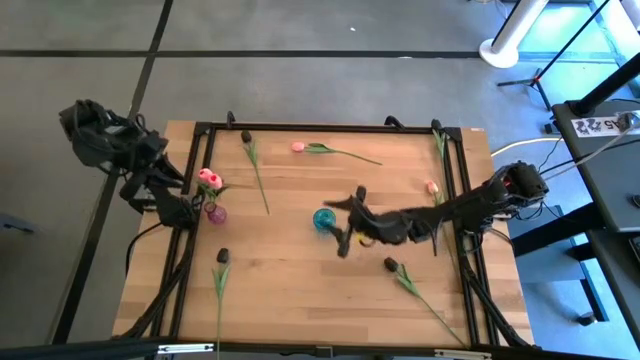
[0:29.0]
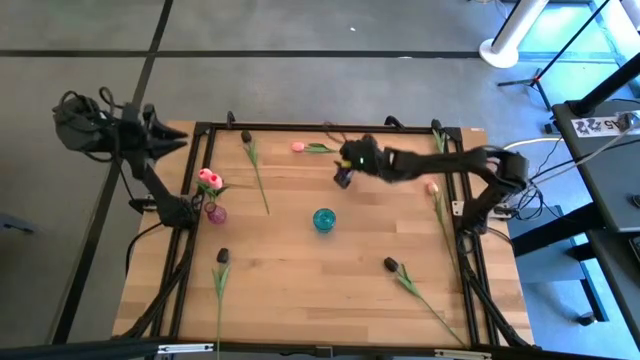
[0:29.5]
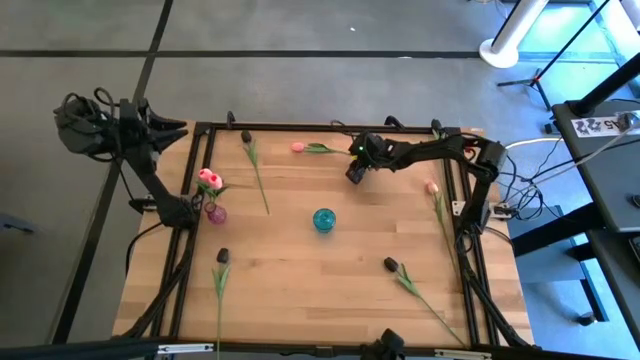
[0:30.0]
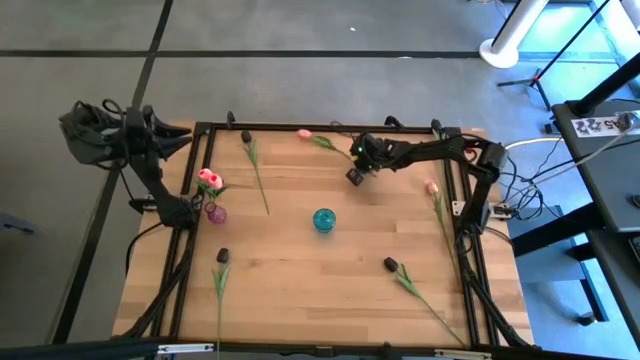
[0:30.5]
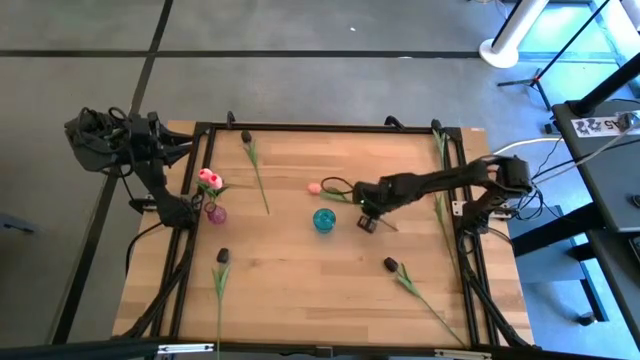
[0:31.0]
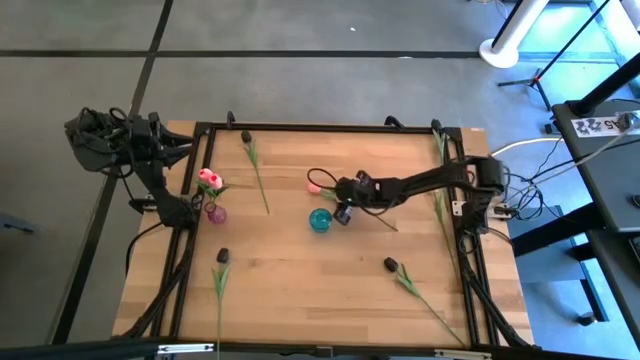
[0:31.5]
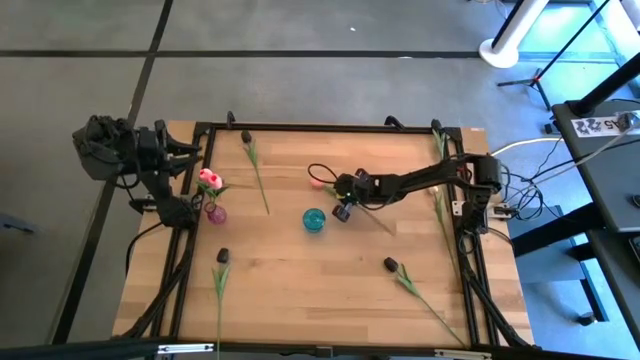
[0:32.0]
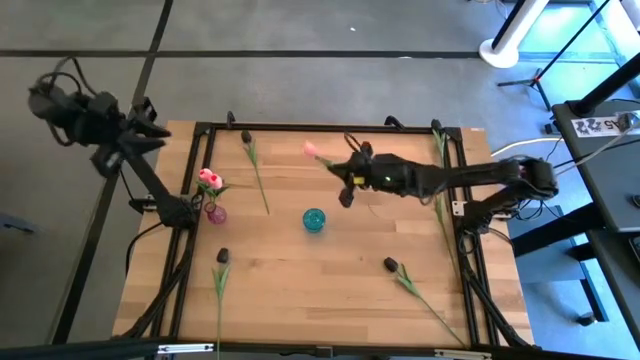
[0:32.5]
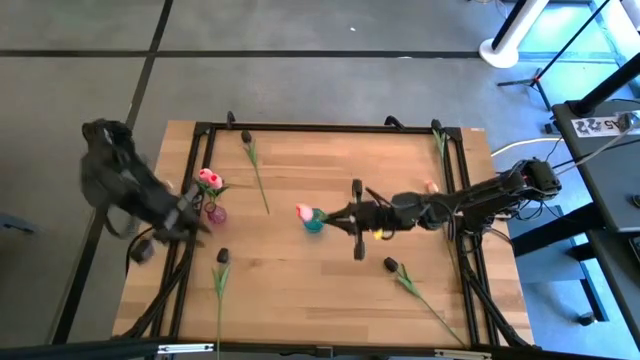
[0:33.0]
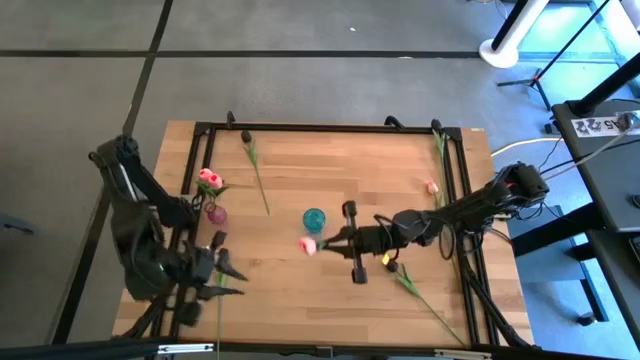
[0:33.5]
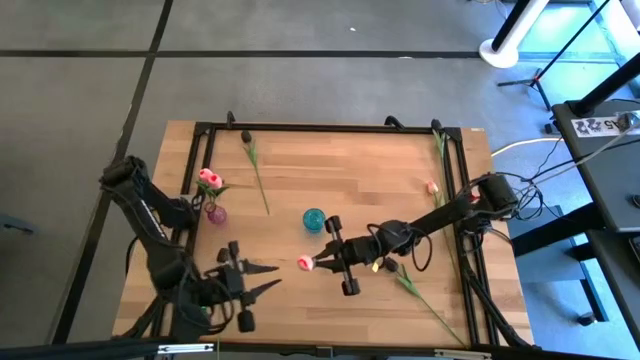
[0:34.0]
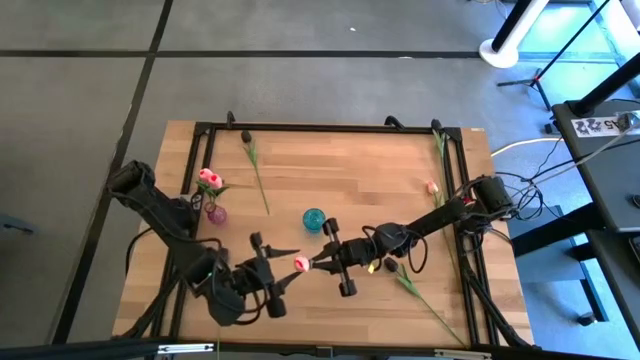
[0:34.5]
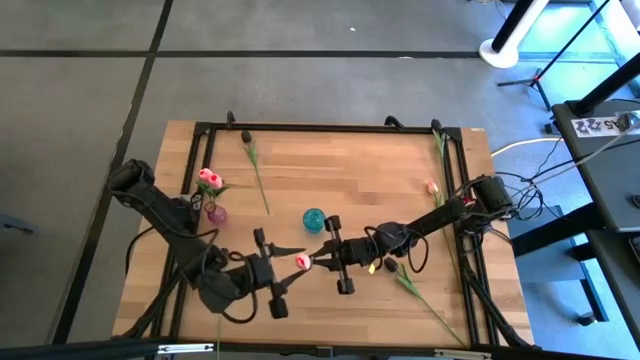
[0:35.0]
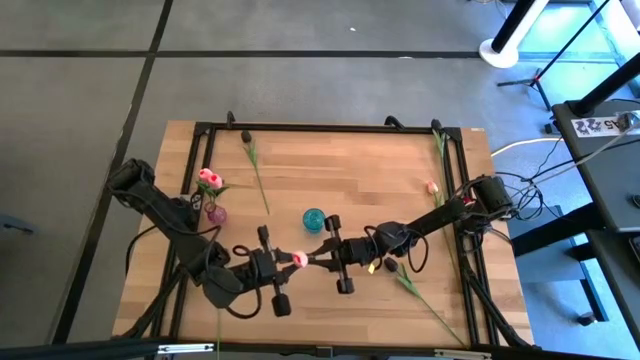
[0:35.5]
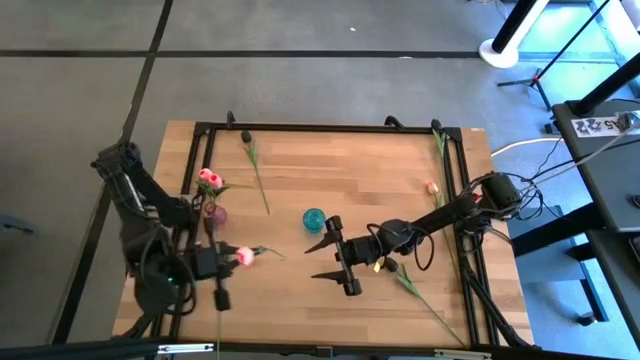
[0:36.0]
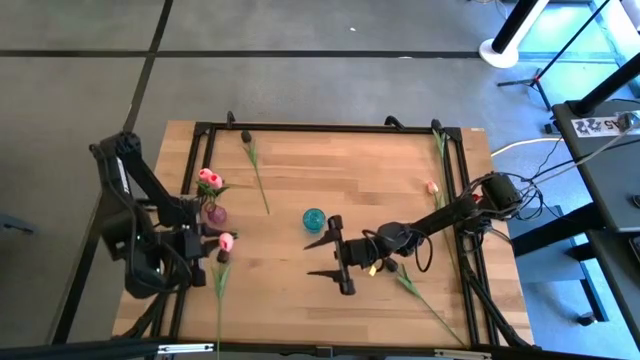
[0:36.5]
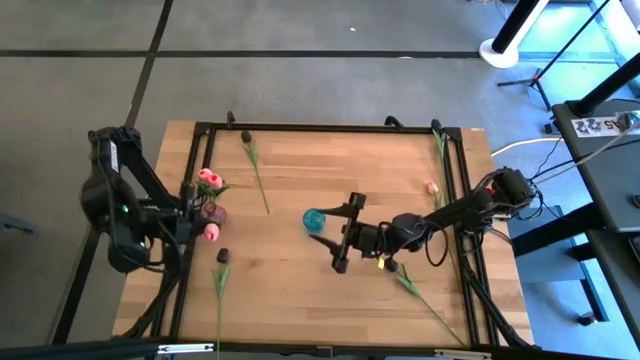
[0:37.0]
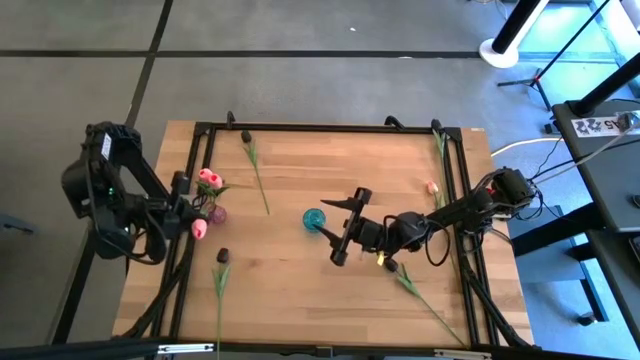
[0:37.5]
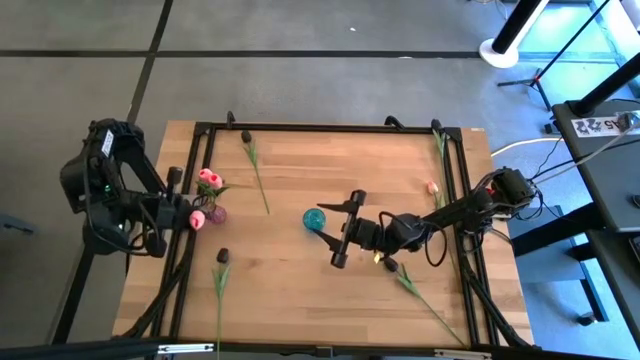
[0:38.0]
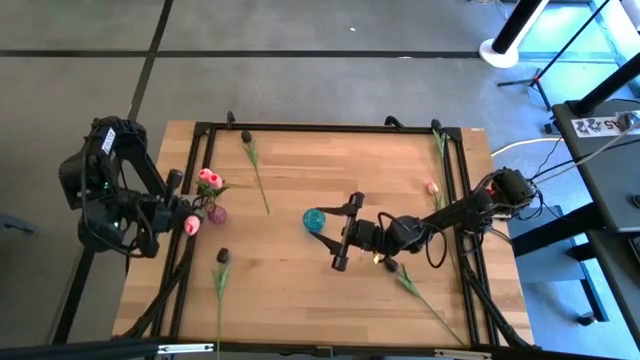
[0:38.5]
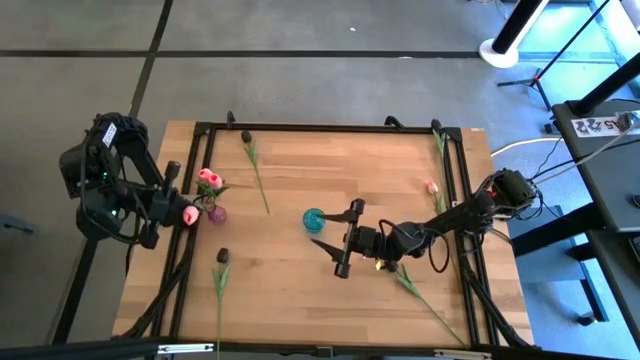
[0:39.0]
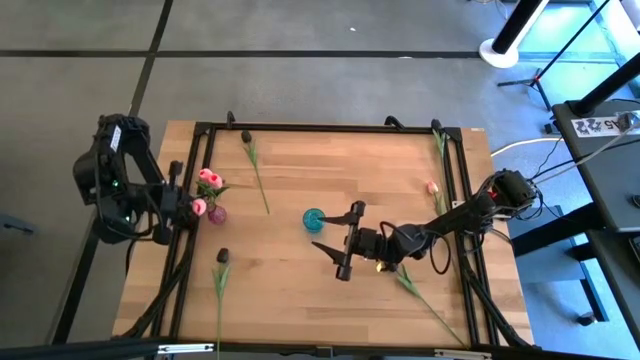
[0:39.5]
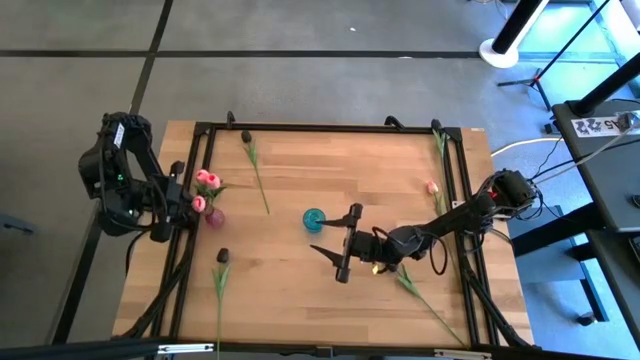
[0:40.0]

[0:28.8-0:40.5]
Task: Sort flowers into vase by color
Put the top pink tulip into the purple vase

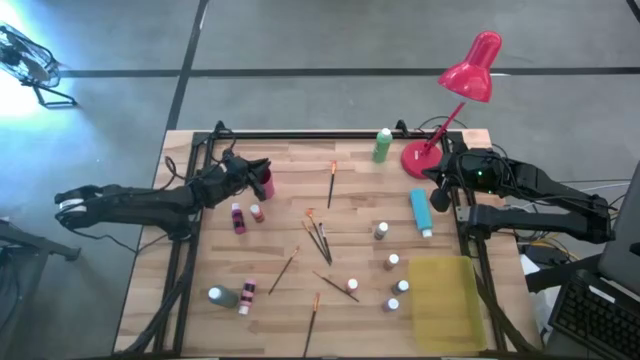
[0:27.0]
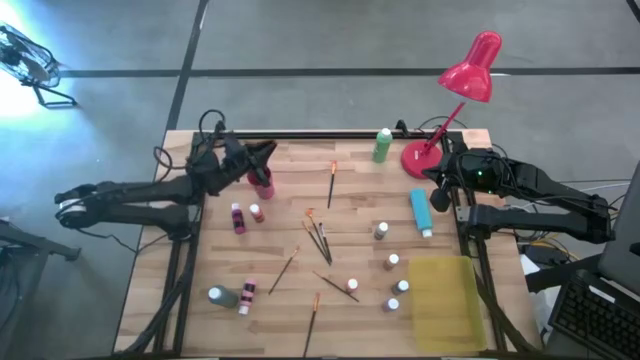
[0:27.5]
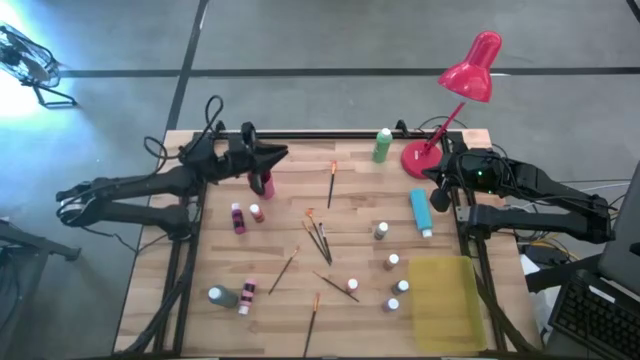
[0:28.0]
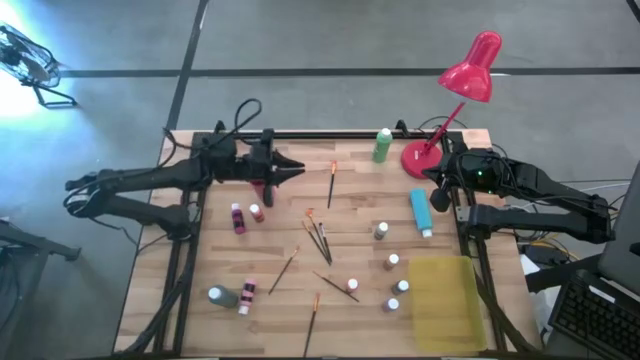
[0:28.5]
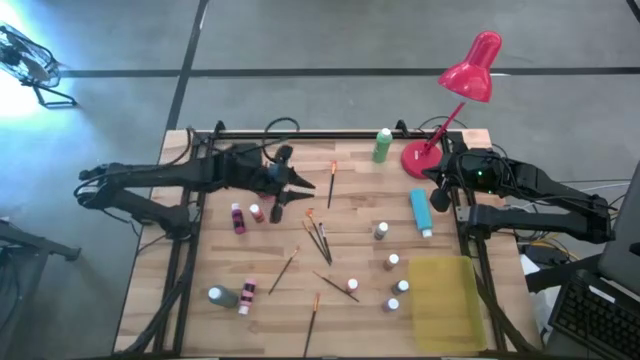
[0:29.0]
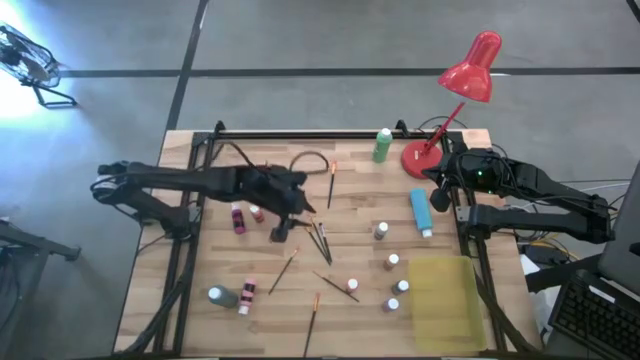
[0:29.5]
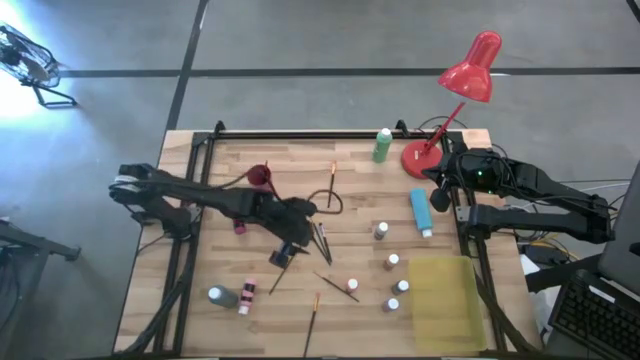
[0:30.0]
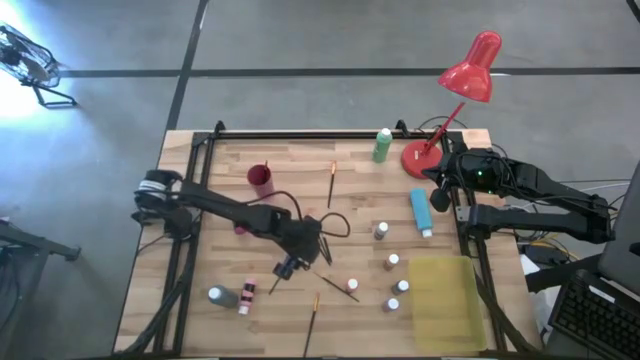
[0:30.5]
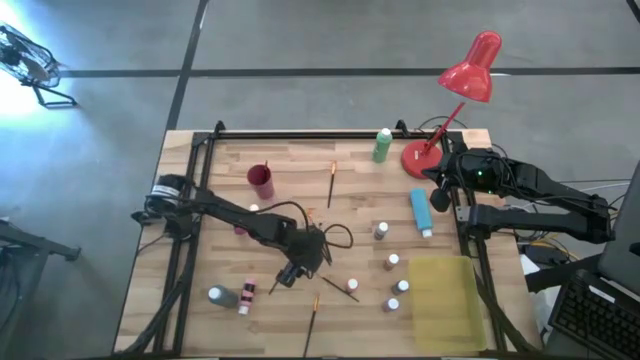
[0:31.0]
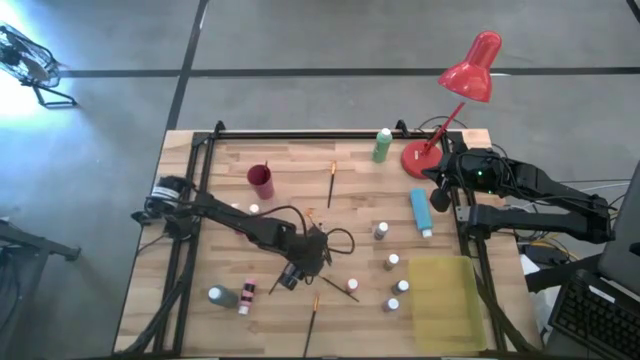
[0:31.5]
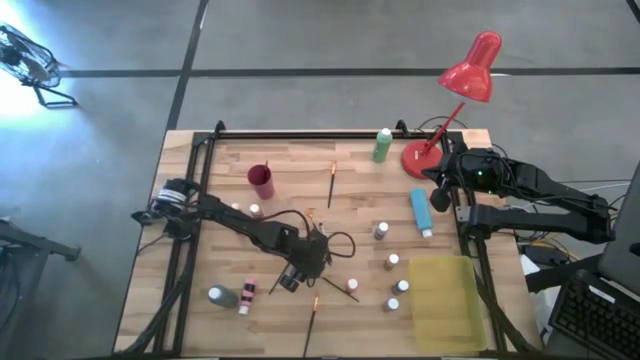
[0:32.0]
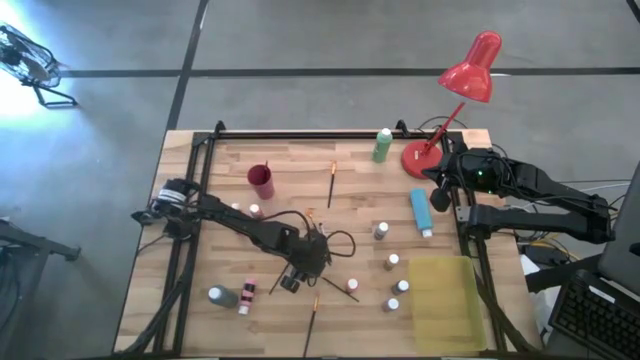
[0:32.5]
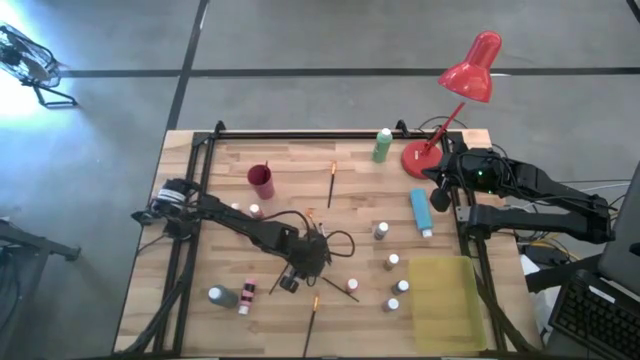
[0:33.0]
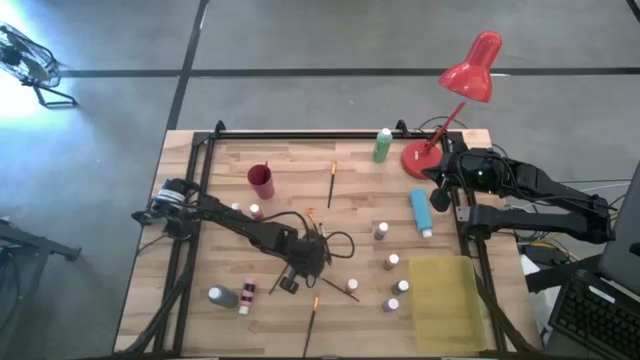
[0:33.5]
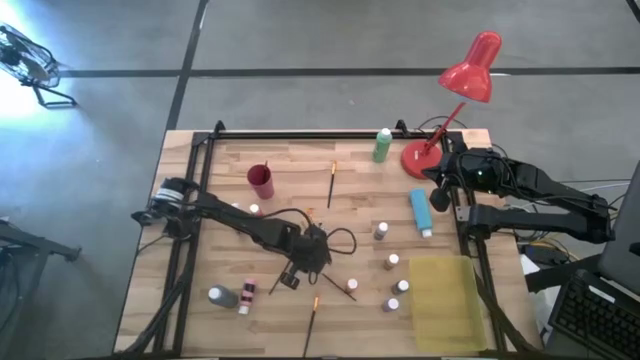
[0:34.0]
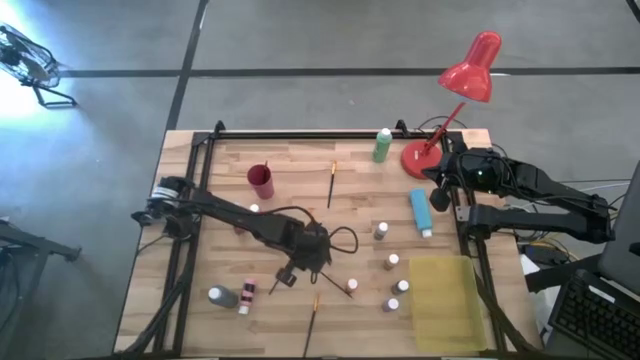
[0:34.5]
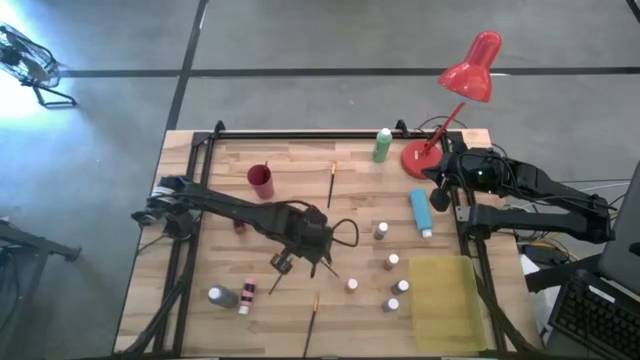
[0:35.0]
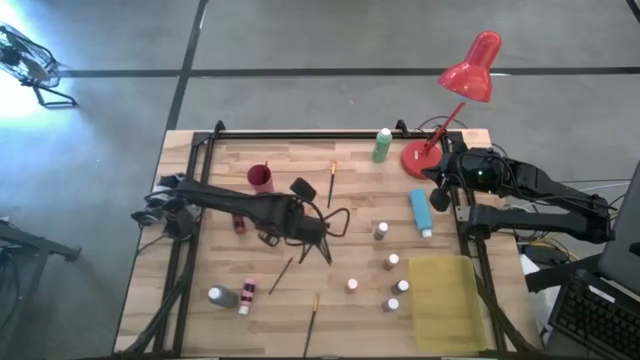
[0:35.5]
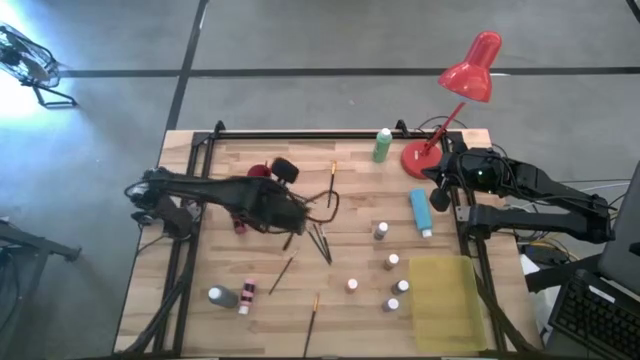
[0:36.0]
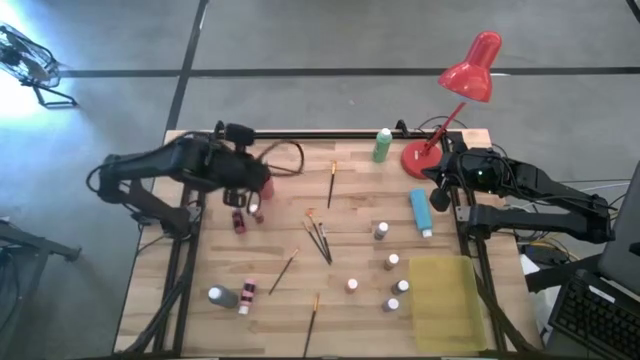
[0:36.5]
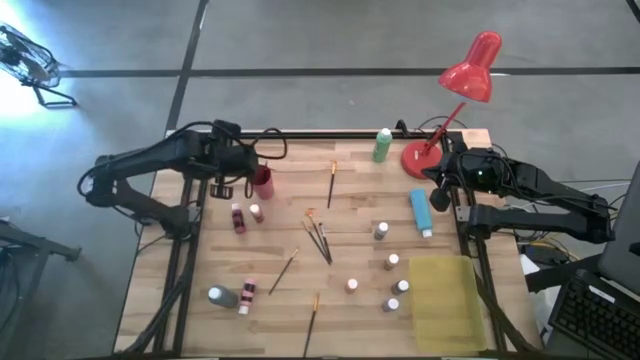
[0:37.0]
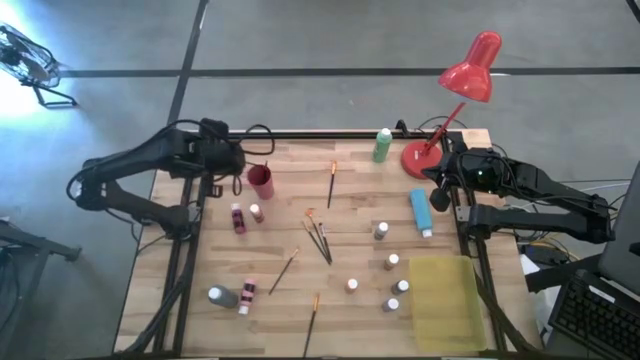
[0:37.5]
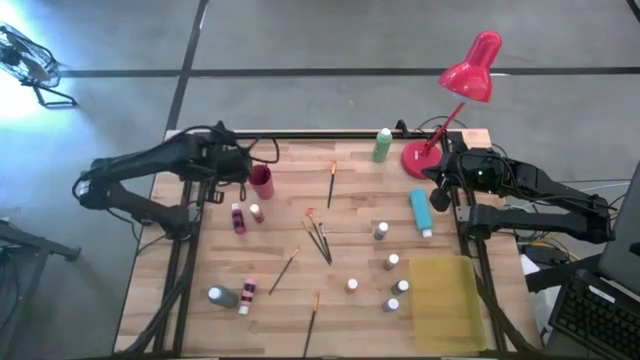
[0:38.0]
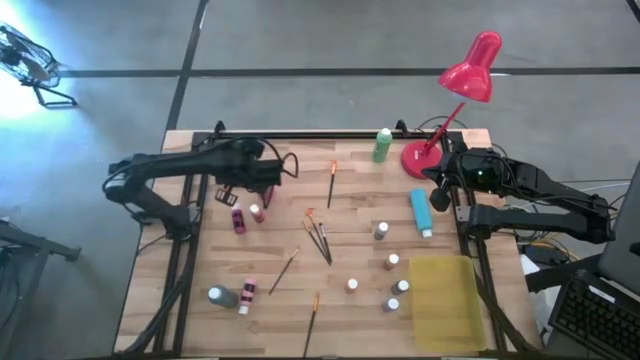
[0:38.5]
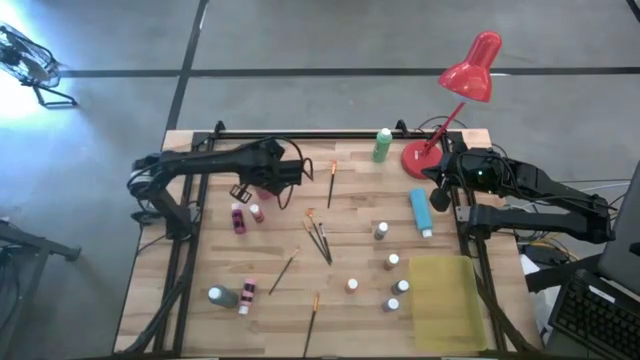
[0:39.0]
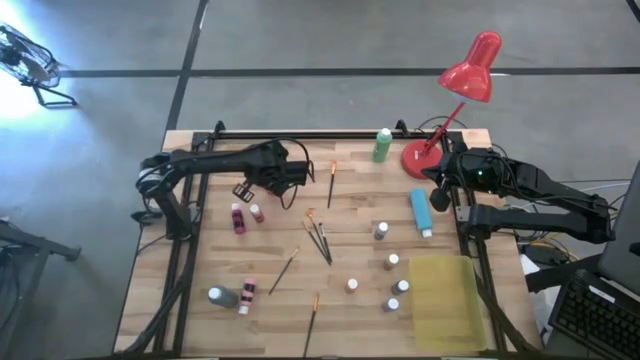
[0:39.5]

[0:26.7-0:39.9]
Task: Pick & Place Paint Supplies
Put the black paint brush into the pink cup
